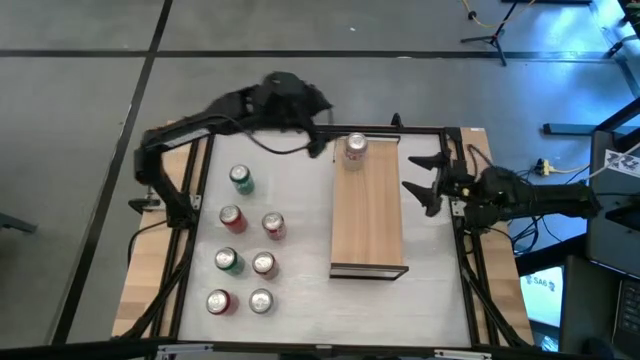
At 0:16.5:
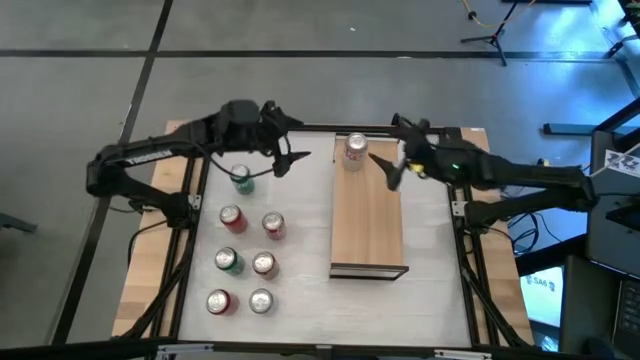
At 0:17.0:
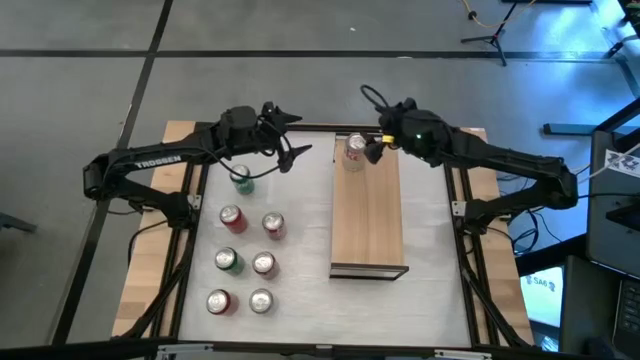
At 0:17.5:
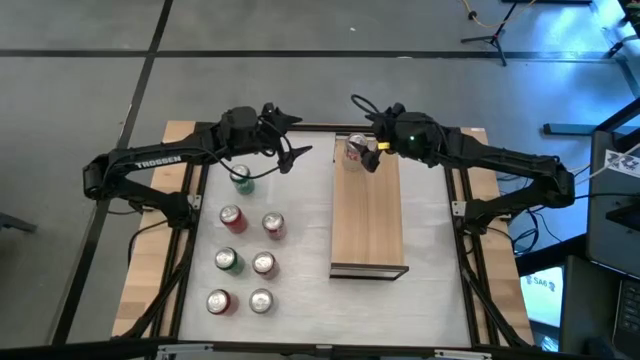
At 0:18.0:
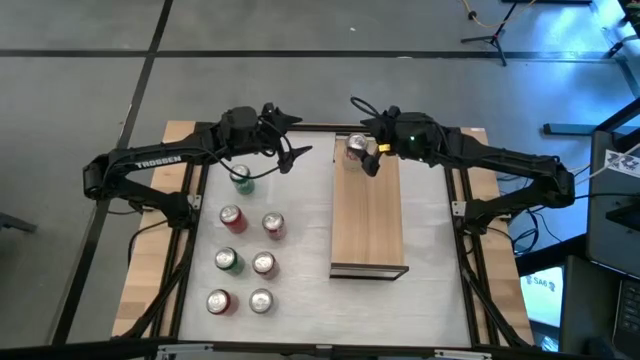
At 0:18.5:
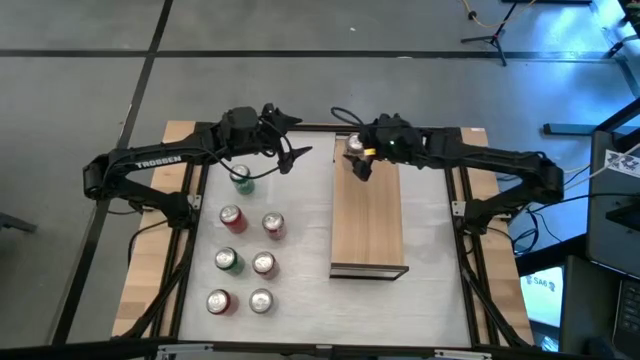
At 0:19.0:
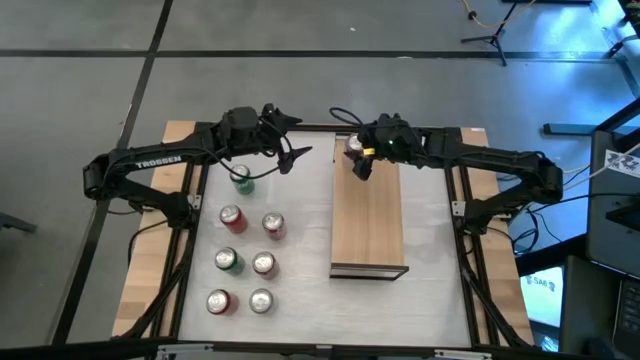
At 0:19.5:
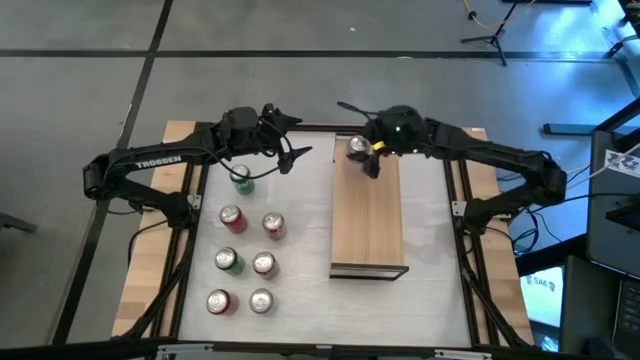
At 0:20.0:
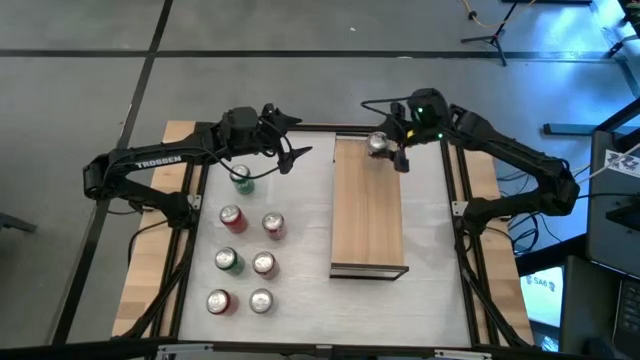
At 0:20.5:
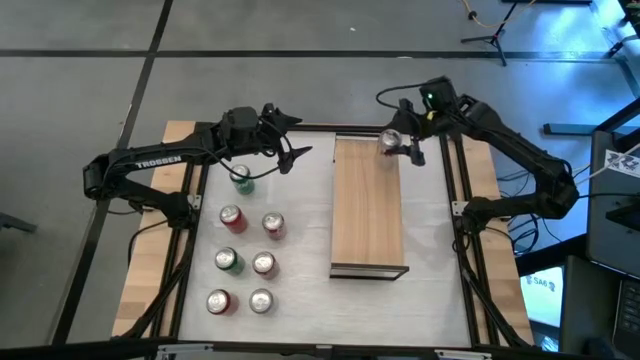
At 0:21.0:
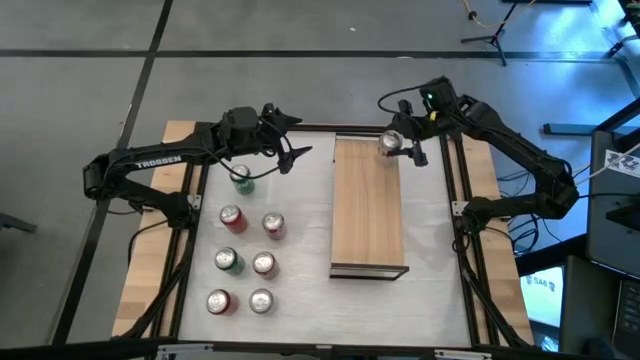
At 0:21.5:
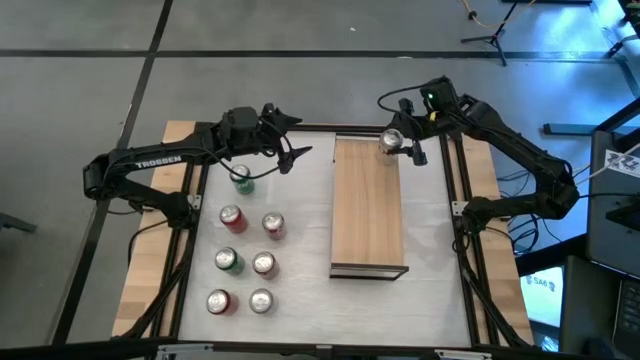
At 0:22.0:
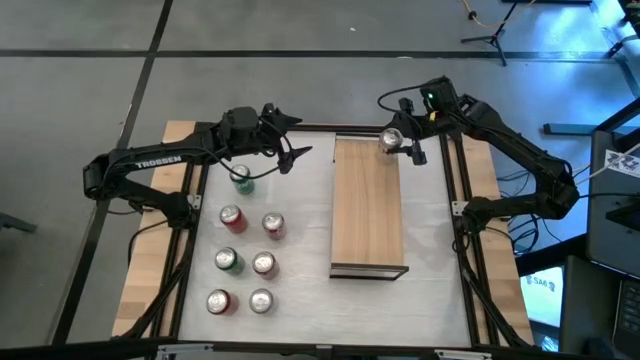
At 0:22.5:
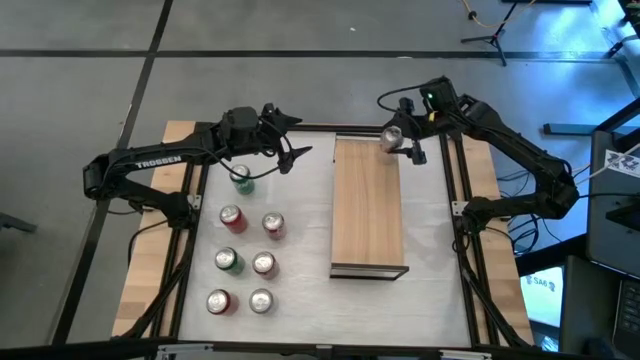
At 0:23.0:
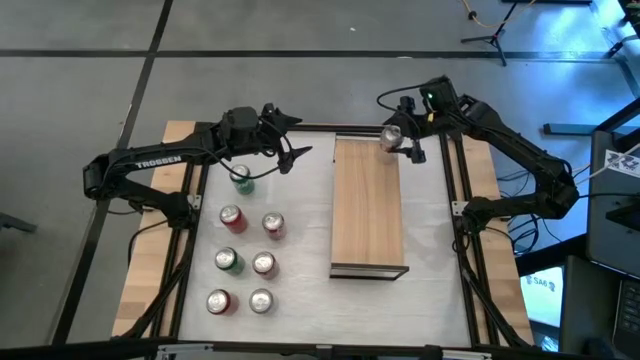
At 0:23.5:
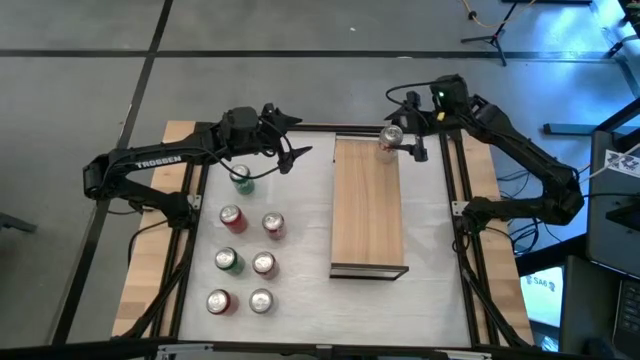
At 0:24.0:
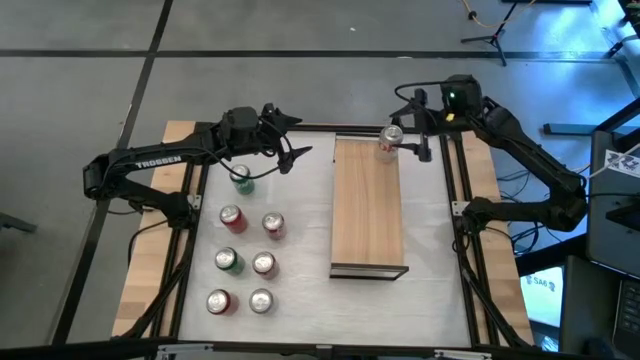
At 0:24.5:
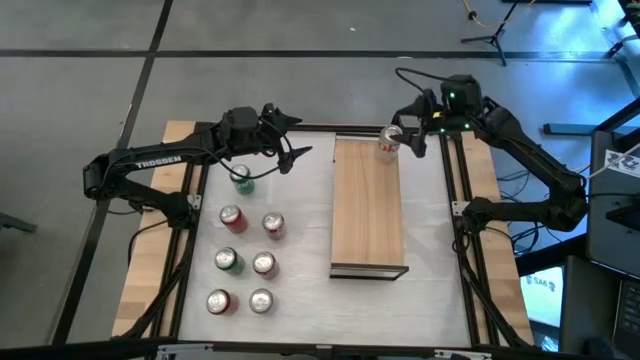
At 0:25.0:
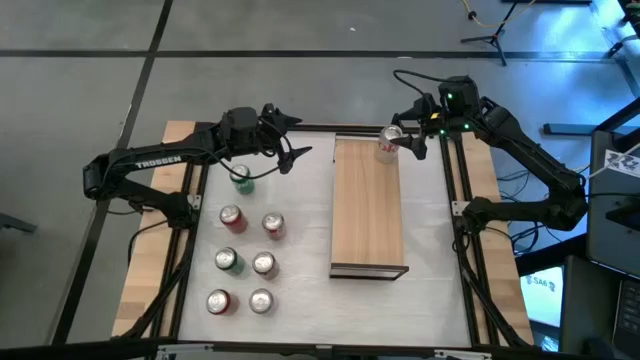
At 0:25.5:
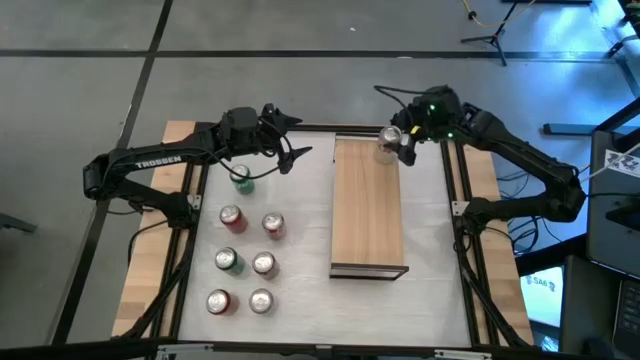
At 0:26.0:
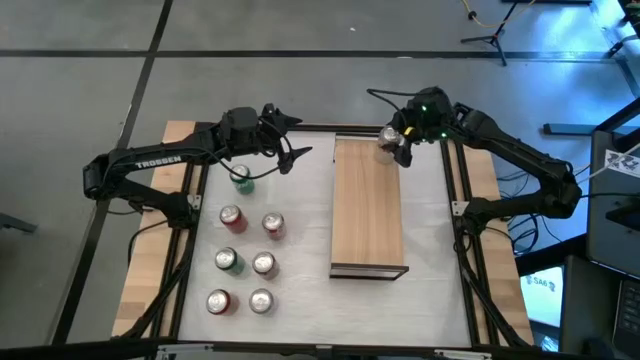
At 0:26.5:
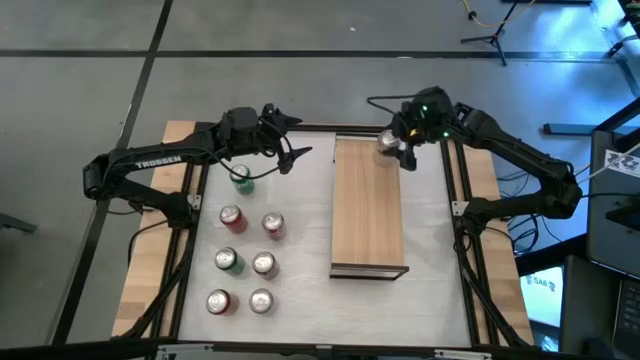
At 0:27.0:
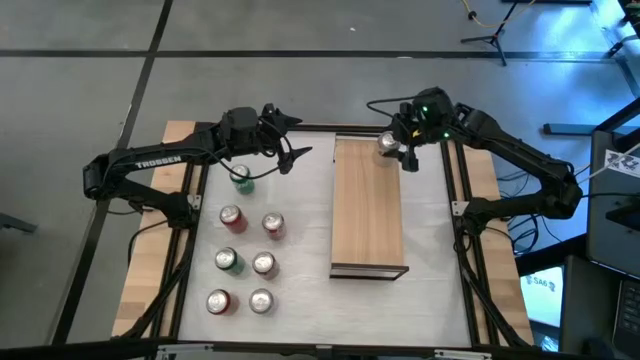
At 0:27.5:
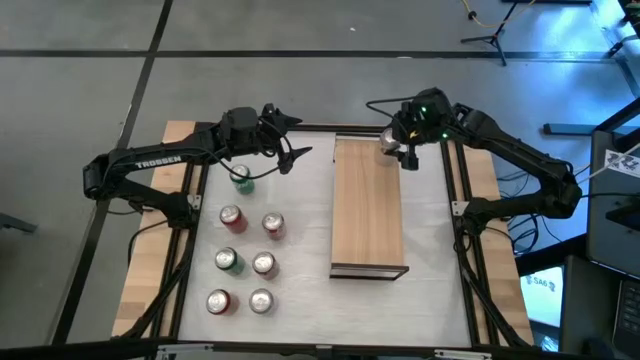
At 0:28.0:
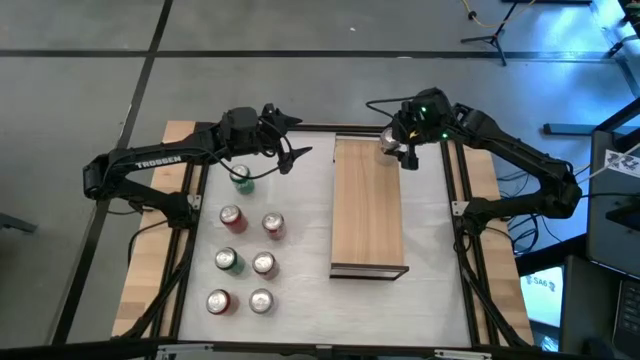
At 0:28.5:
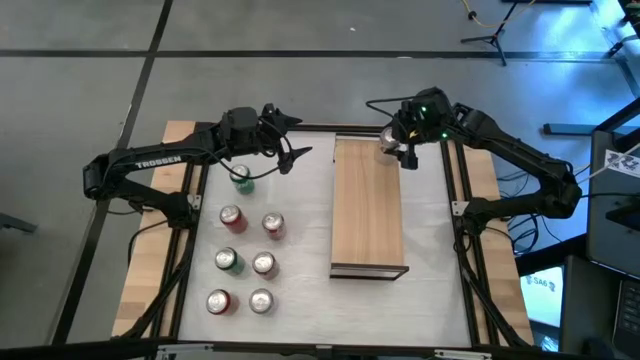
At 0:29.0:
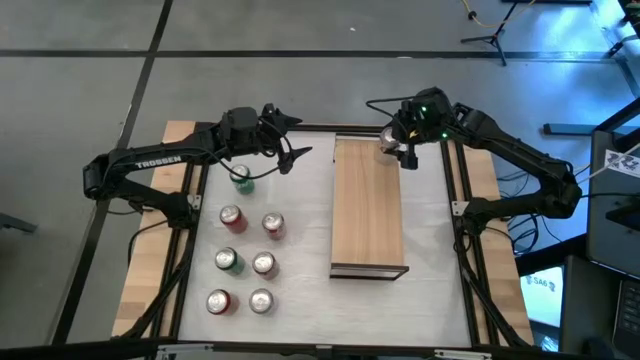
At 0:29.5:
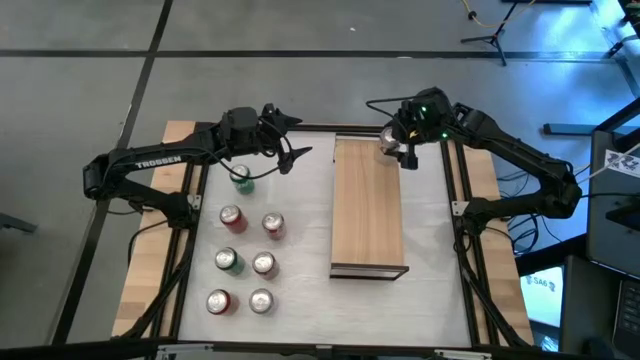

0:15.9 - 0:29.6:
Task: Place canned beverage on shelf
Put the top silver soda can on the shelf

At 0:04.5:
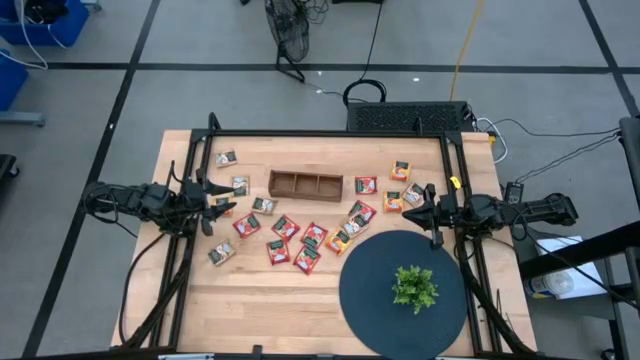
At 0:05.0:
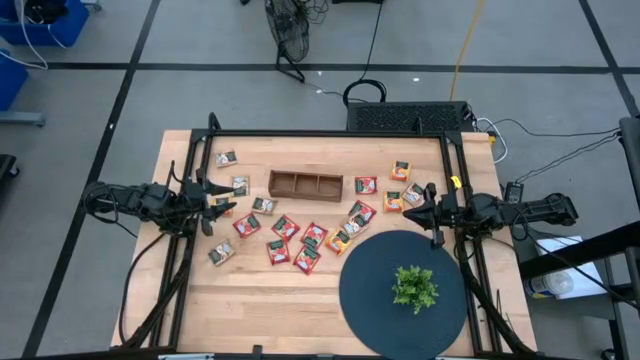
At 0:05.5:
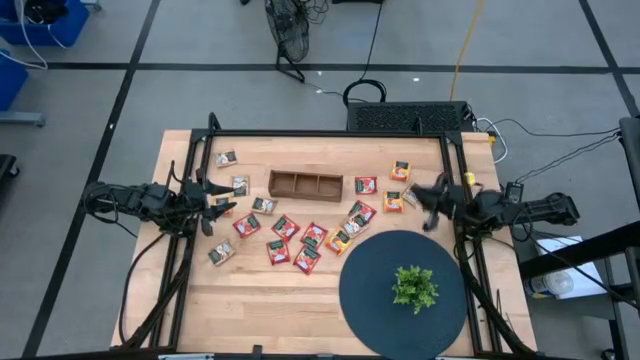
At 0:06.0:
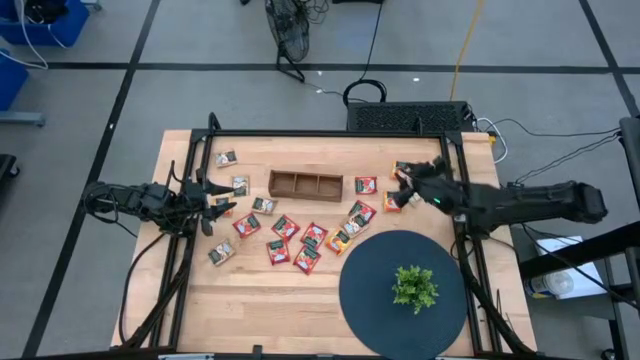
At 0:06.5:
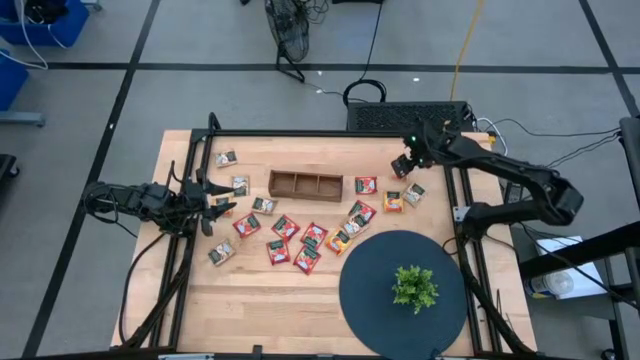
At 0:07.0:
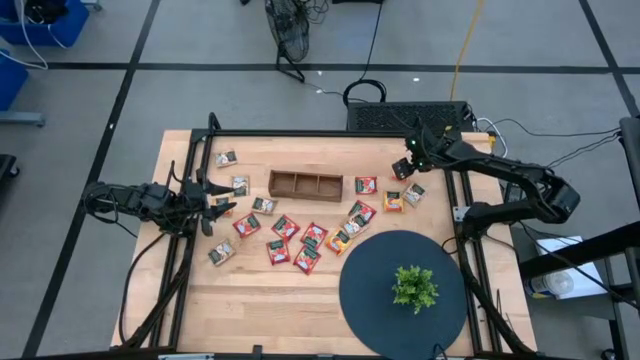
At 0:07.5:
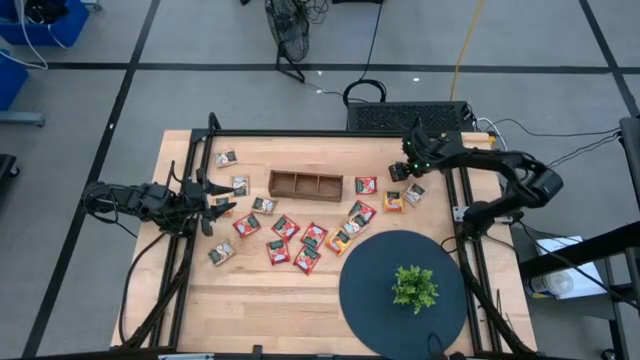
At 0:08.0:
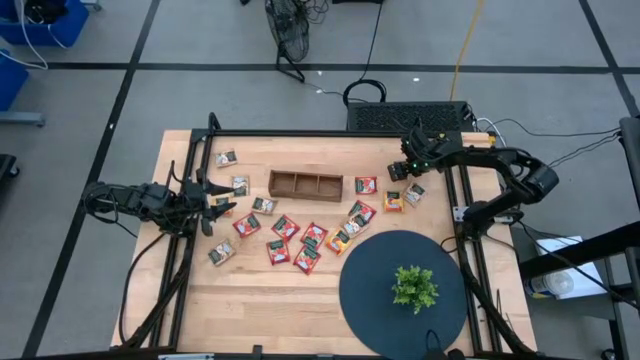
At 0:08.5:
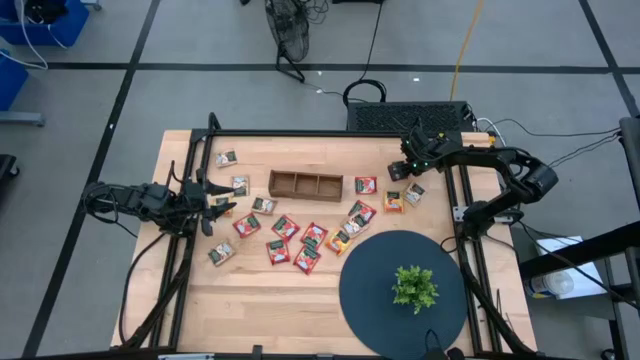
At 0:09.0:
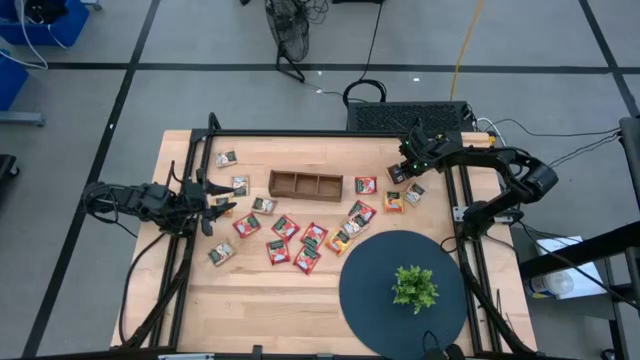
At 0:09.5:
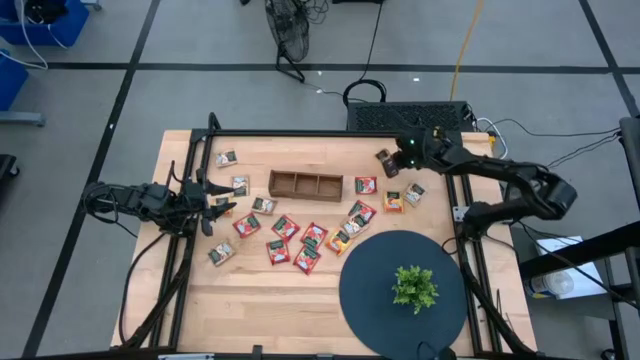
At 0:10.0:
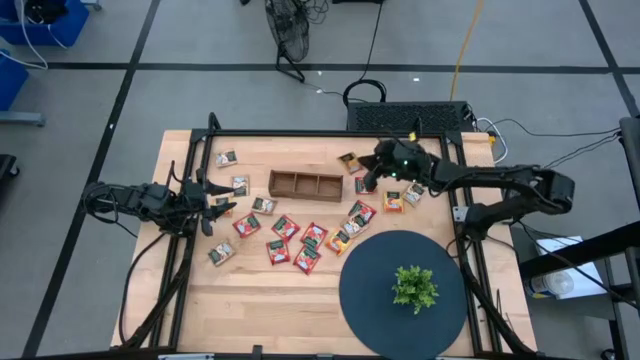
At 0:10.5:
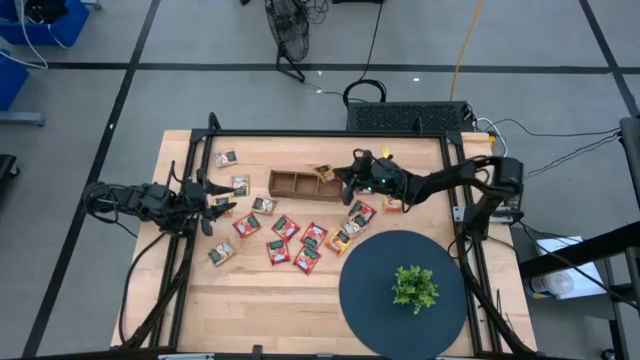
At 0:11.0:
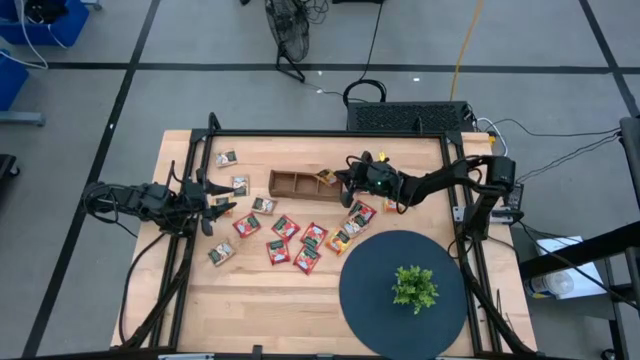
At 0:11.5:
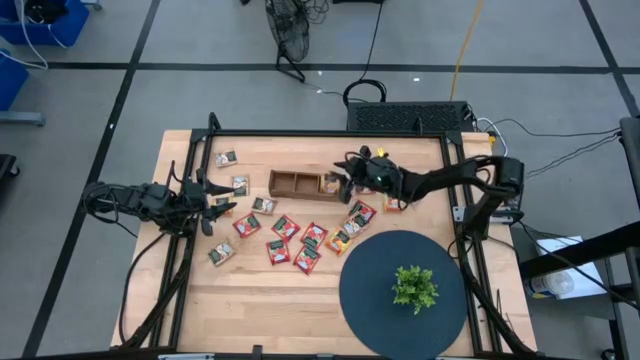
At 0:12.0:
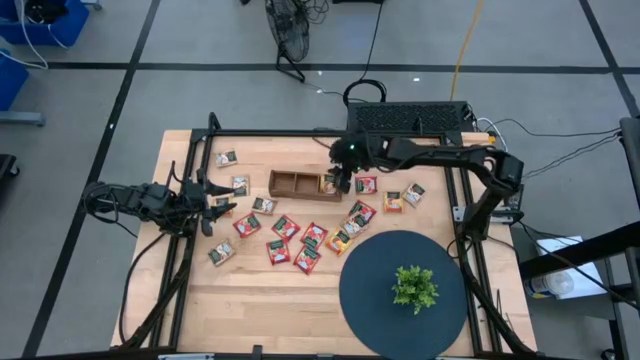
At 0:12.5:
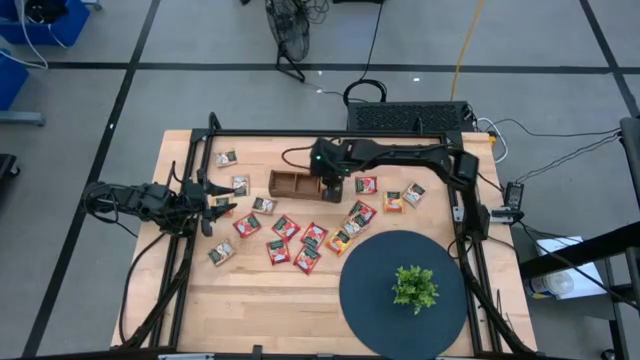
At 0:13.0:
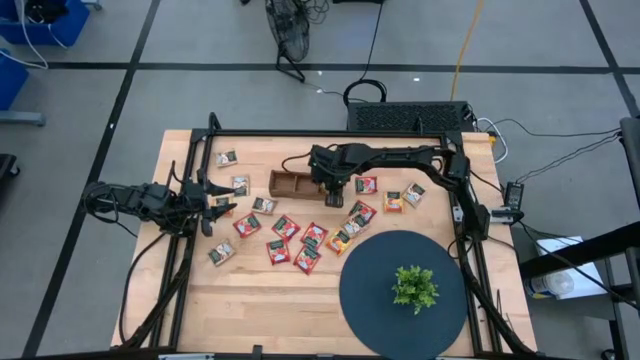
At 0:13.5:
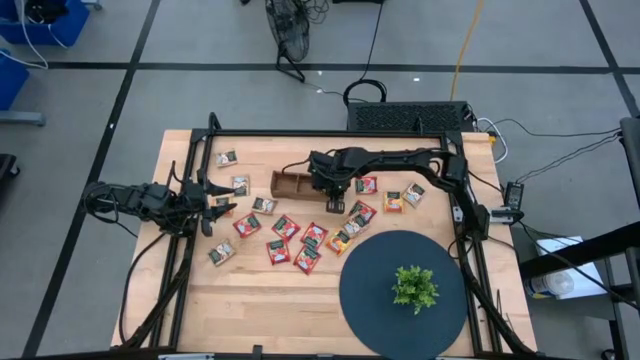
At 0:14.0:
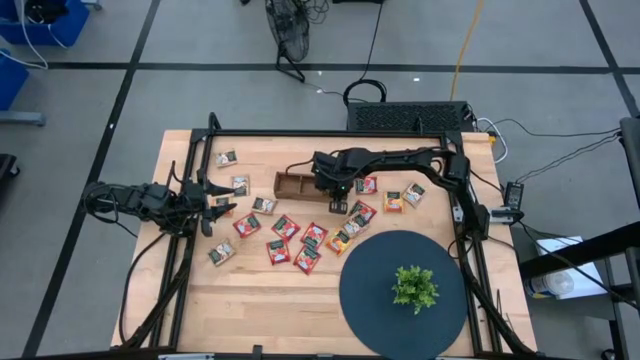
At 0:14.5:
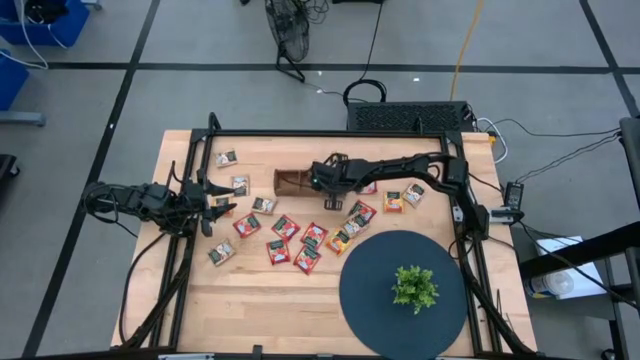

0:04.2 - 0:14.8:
Task: Pick & Place Tea
Put the yellow tea bag into the right section wooden organizer
